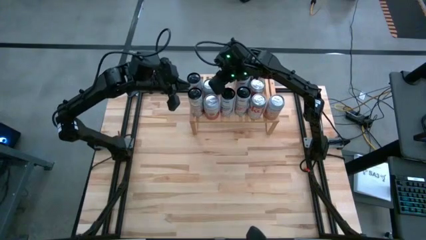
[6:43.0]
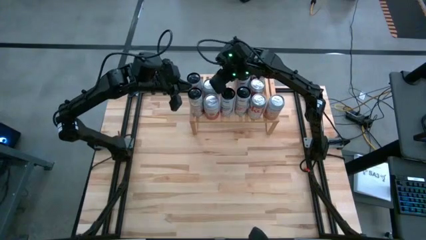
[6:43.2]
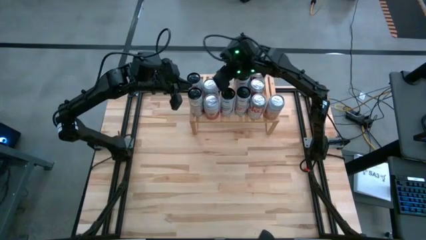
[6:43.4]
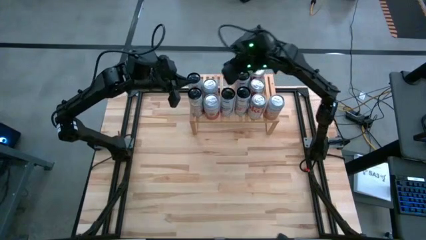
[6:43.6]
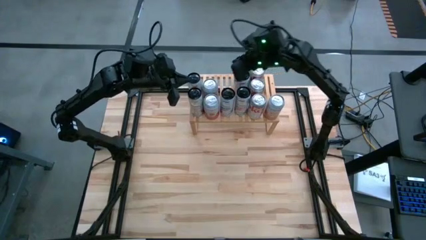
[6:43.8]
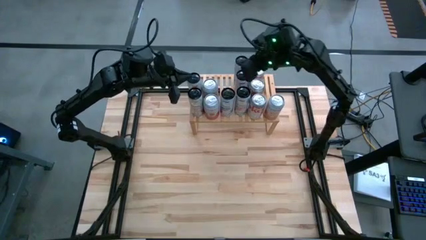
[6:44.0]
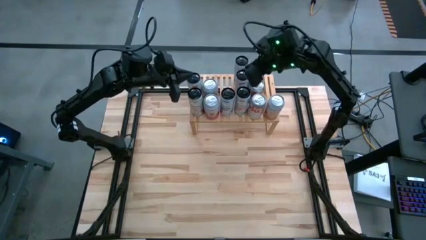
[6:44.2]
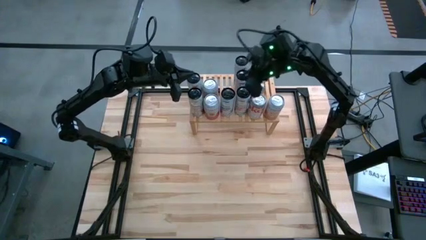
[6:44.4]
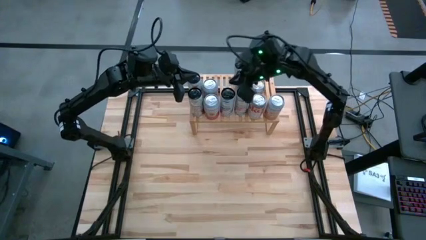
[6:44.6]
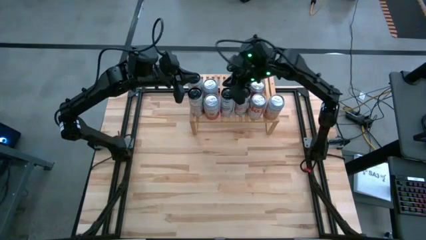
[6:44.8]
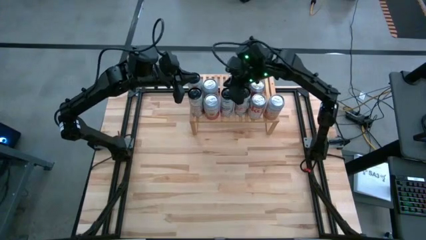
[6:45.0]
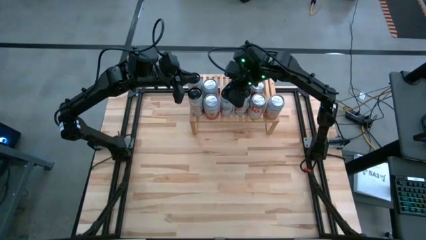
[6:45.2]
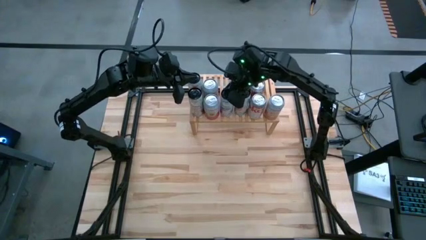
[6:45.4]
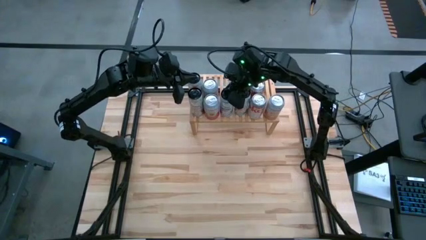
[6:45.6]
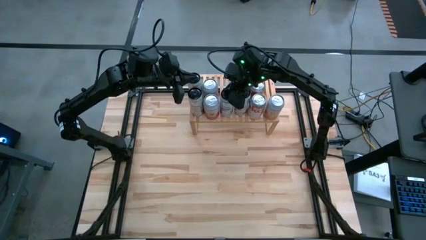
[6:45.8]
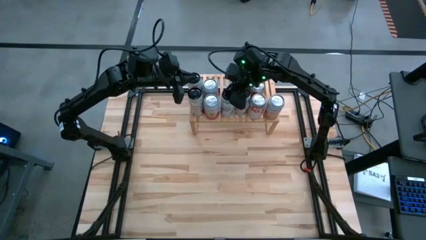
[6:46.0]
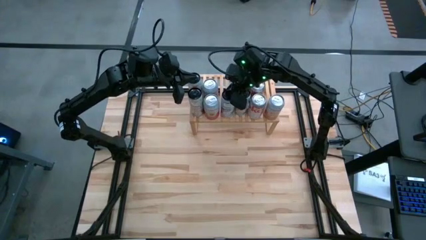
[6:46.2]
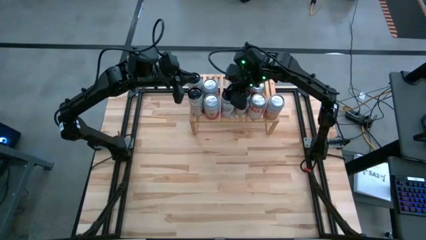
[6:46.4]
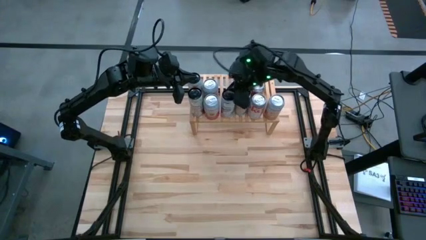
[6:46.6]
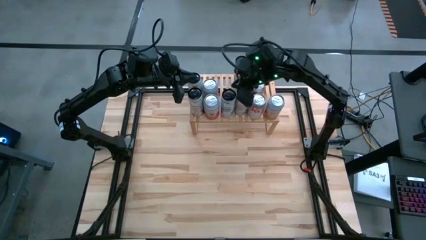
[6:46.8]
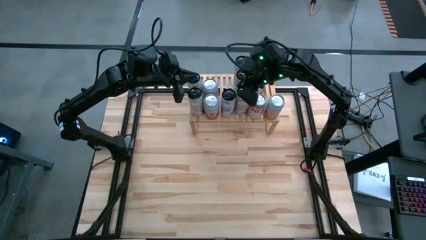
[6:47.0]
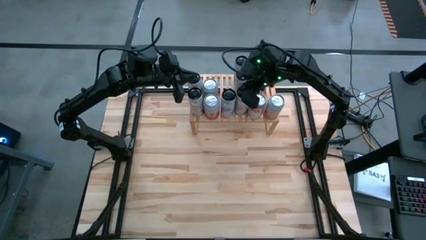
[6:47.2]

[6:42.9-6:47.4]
Task: Place canned beverage on shelf
Adjust the blue soda can on the shelf

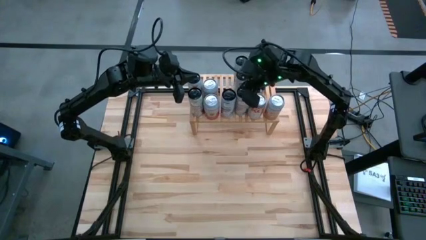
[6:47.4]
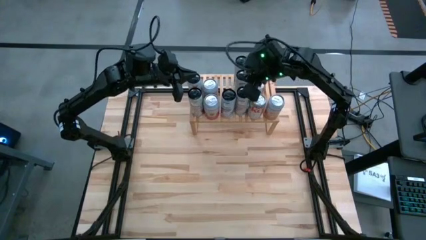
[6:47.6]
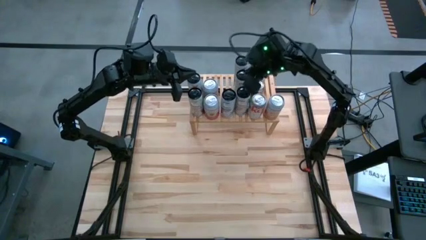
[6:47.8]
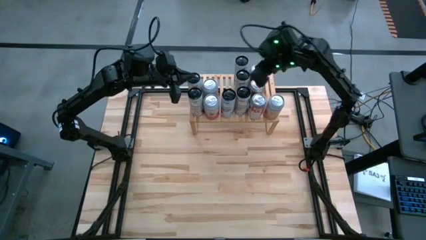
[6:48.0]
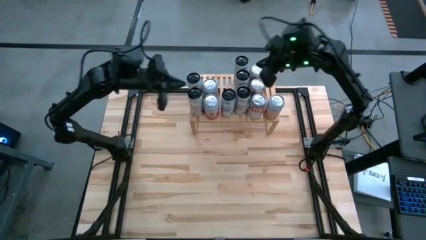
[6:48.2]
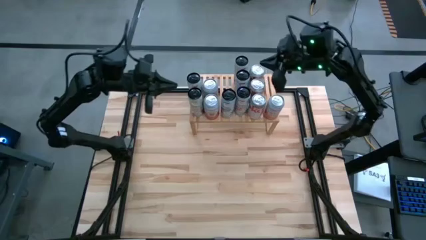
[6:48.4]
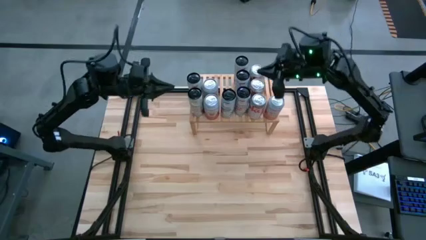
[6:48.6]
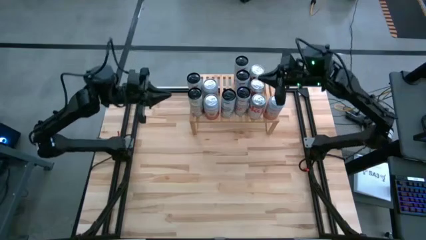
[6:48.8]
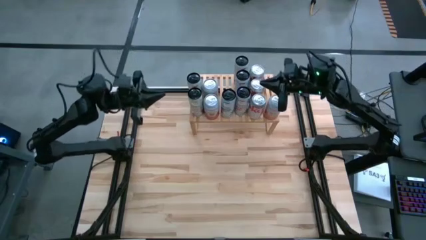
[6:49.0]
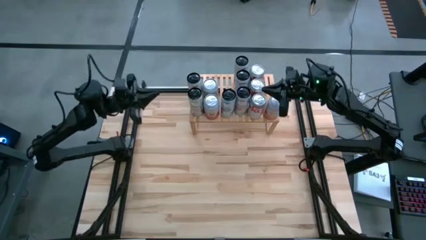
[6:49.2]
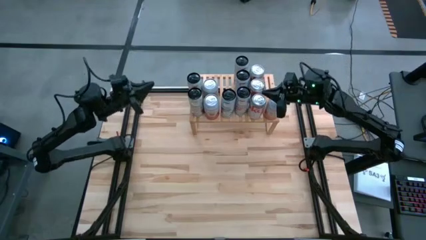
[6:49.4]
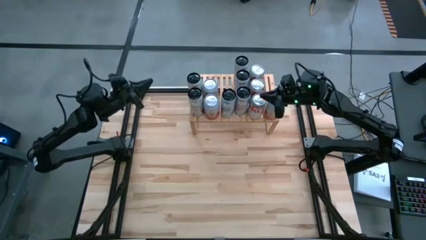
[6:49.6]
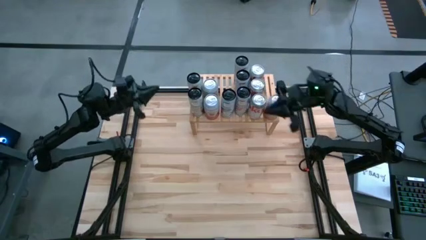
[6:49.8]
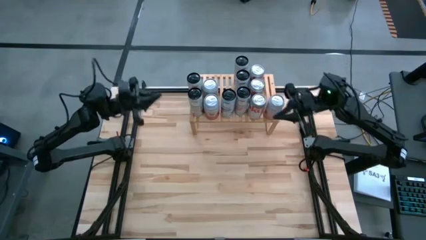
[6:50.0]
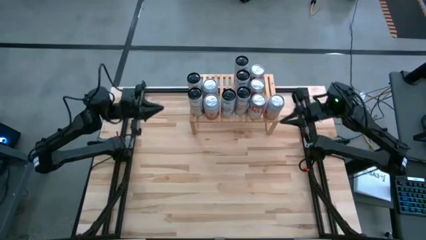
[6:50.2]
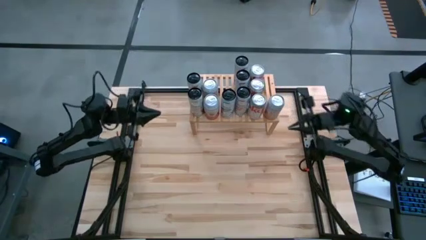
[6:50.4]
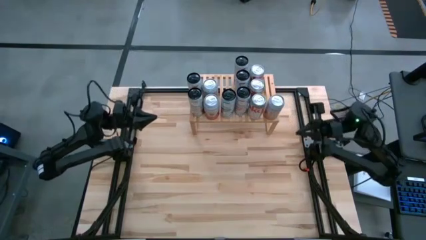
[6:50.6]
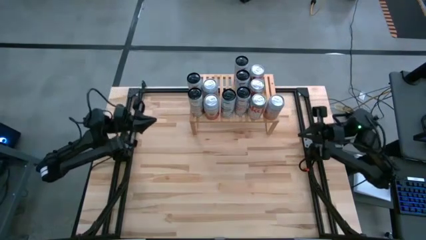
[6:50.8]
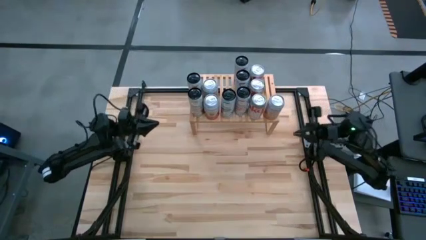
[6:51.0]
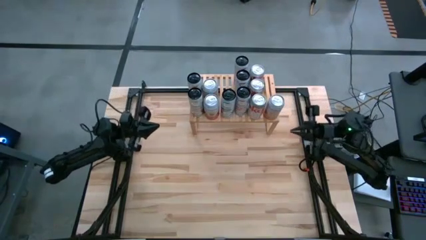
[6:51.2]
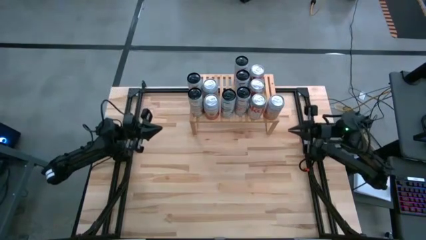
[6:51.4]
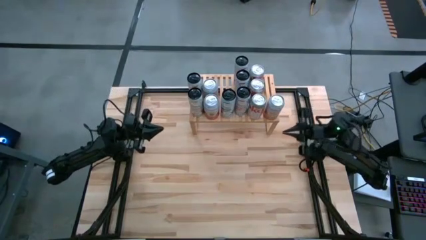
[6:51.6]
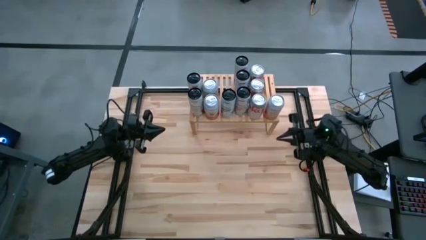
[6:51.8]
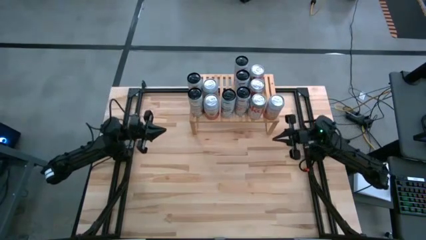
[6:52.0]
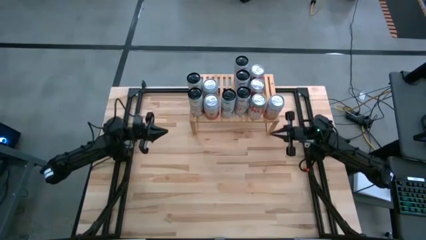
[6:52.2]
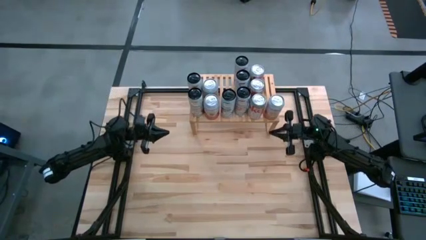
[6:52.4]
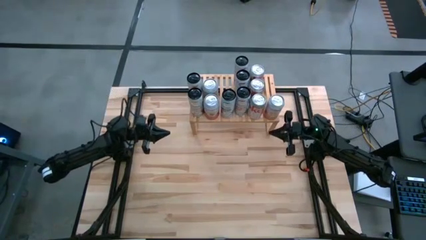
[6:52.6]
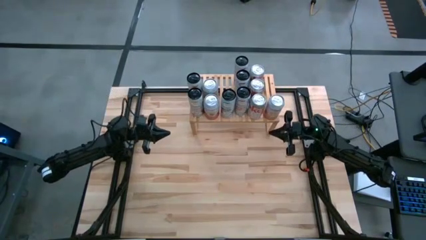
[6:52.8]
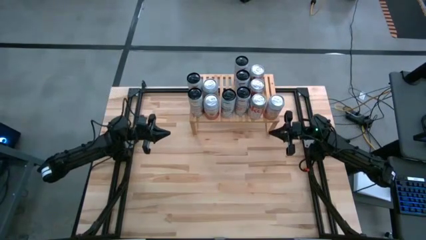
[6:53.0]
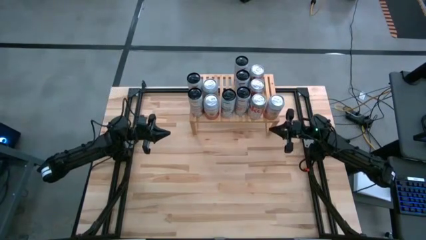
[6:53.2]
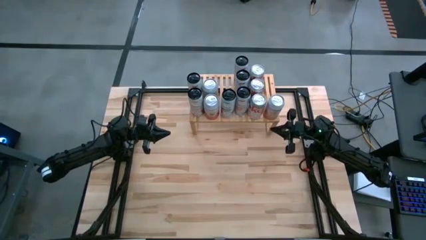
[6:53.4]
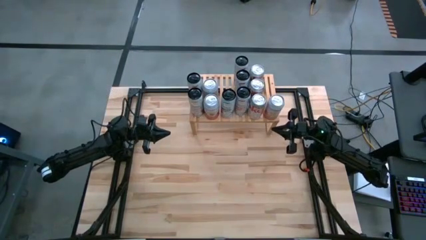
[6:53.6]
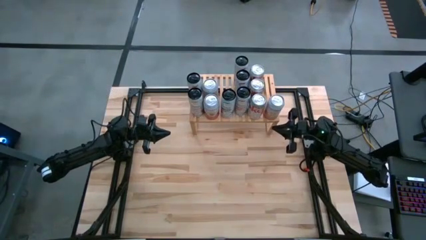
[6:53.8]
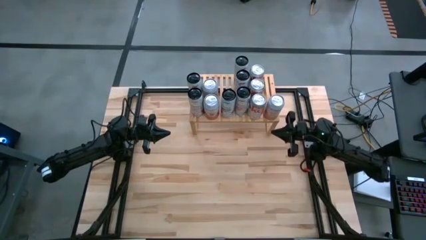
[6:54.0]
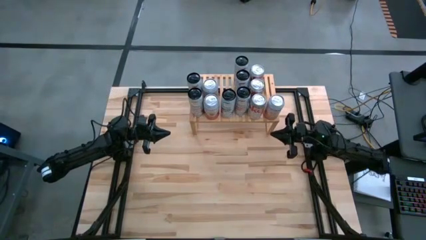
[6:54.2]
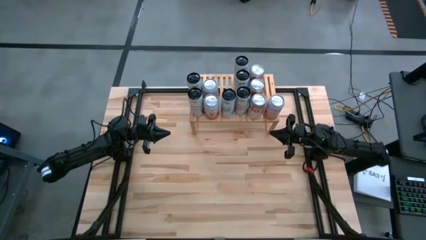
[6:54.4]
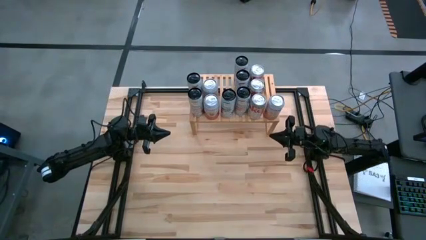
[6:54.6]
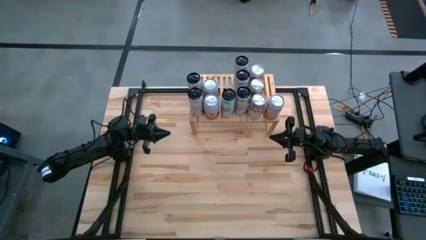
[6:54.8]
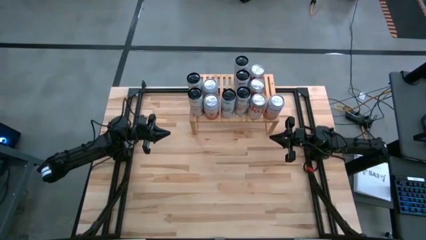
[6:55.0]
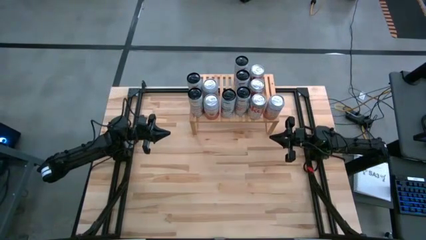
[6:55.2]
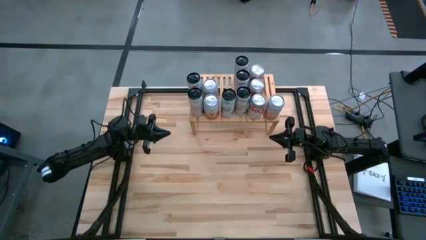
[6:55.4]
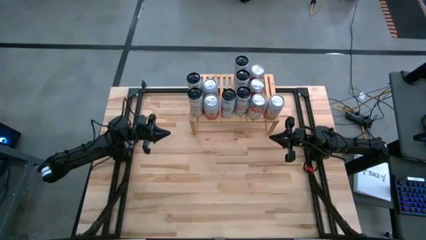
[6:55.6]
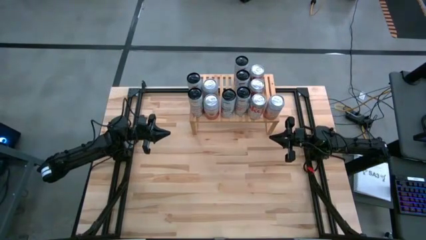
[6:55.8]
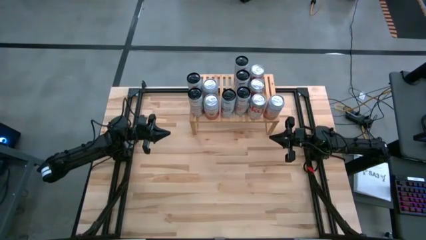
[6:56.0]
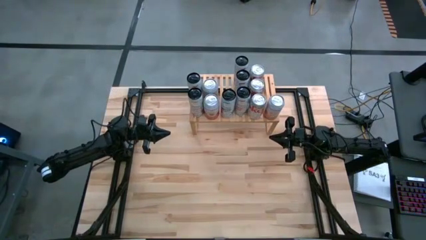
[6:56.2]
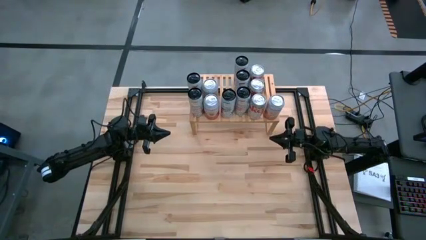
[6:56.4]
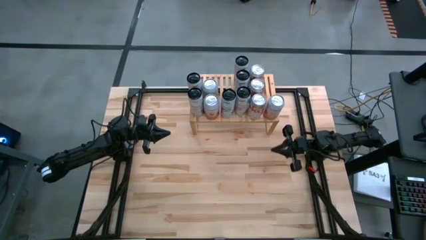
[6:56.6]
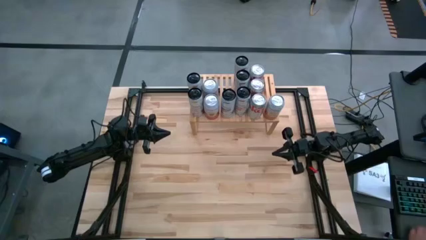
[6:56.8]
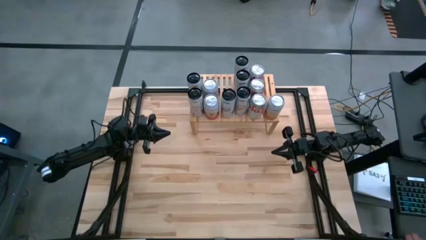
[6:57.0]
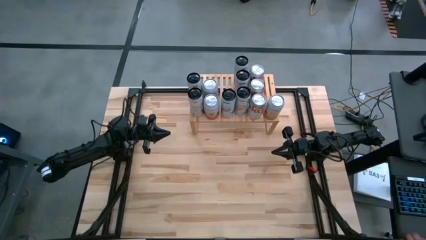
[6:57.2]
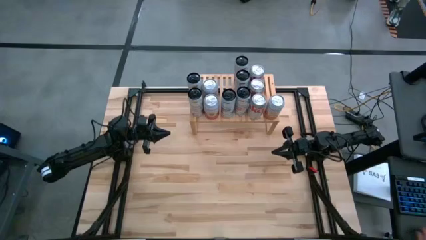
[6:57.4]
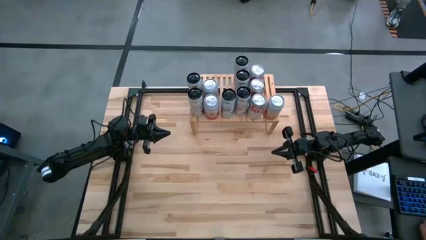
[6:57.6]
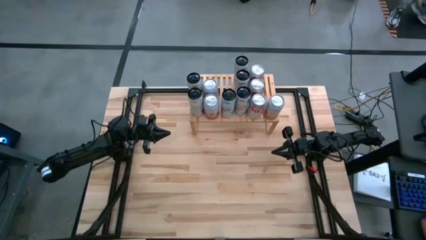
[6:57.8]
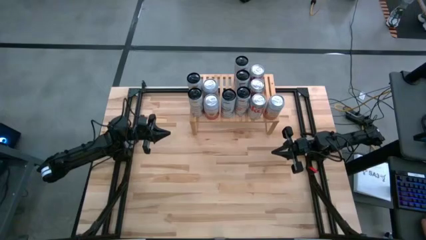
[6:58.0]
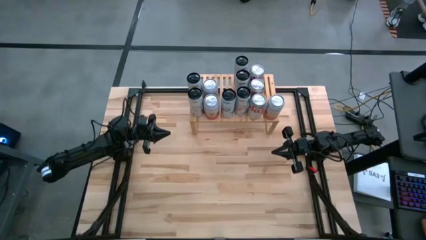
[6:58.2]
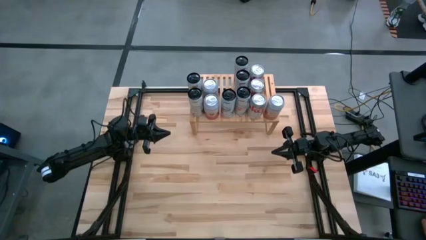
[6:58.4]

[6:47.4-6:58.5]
Return to Home Position

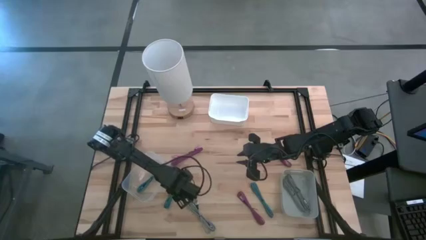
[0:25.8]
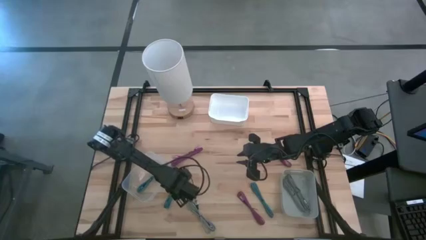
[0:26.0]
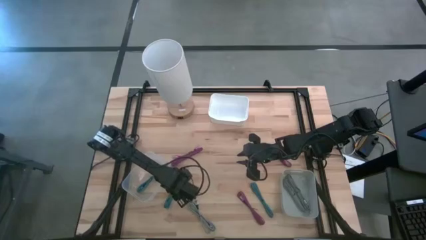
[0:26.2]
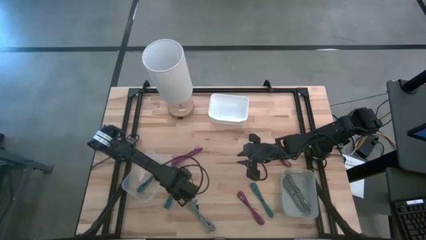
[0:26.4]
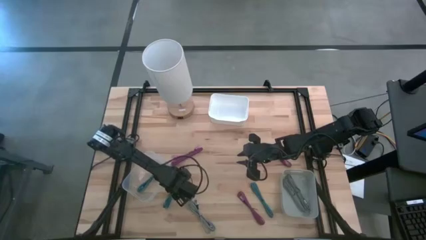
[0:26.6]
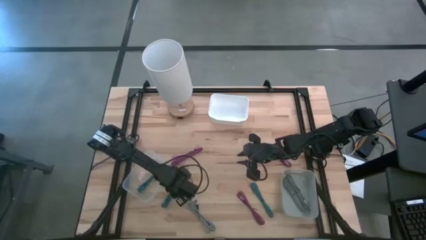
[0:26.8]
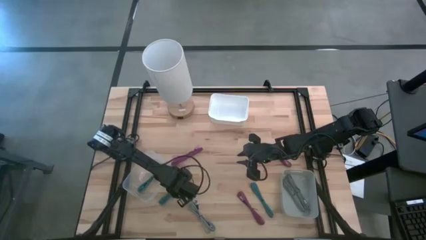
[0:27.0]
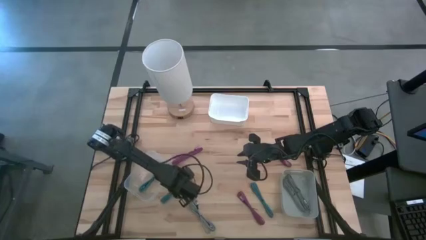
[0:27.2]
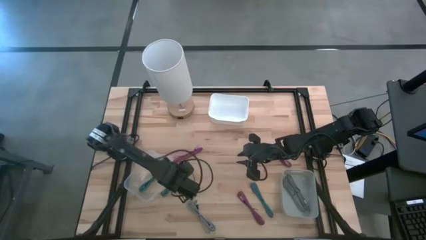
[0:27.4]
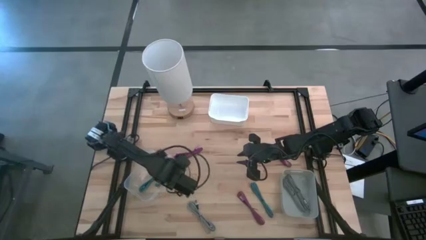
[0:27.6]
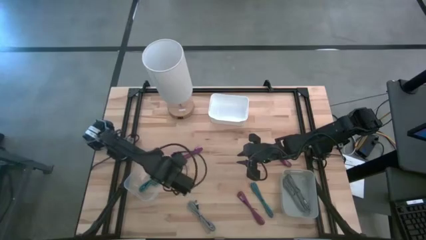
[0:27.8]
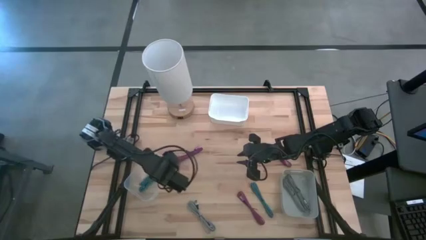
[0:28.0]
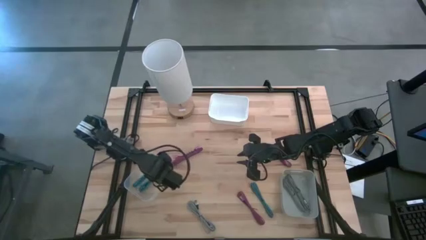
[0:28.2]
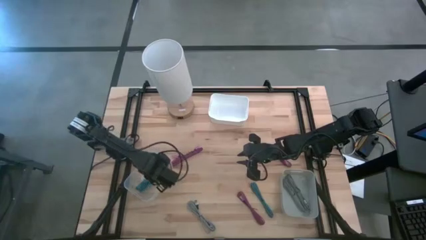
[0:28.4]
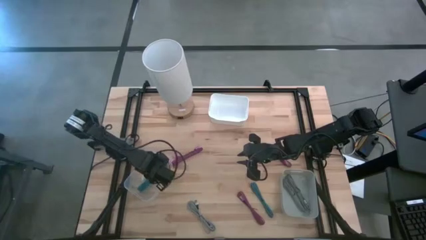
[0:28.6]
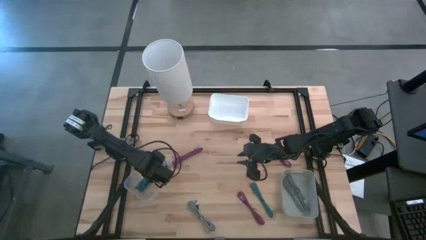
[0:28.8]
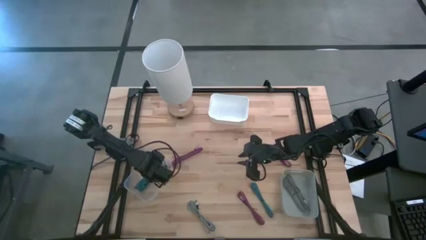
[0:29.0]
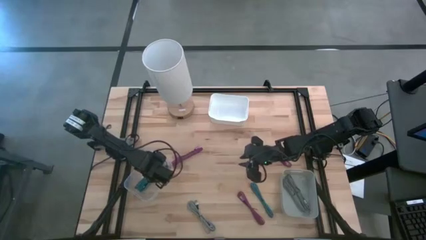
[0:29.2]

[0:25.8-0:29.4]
Task: Pick & Place USB Port
Put the left blue charger cable into the transparent bin
